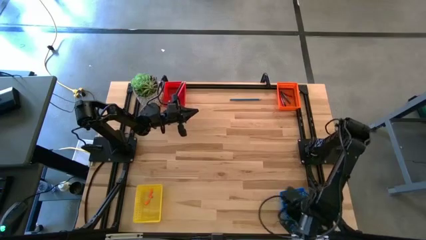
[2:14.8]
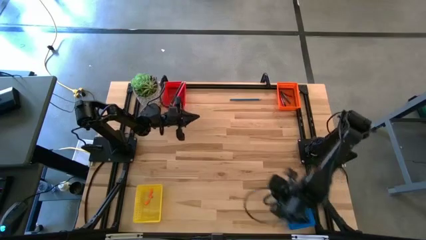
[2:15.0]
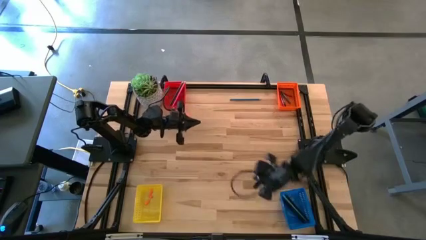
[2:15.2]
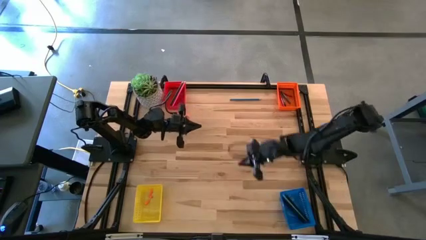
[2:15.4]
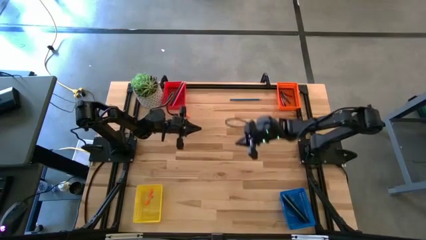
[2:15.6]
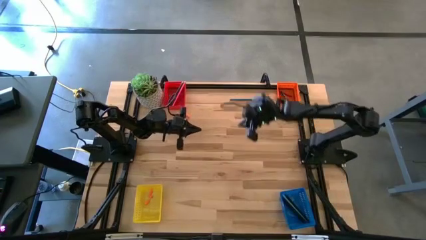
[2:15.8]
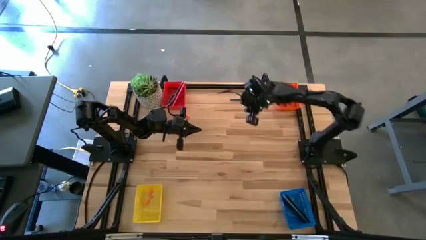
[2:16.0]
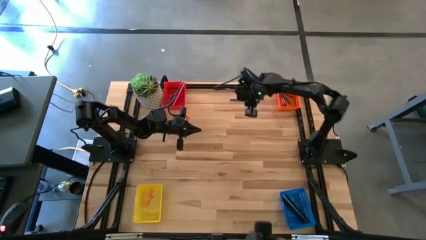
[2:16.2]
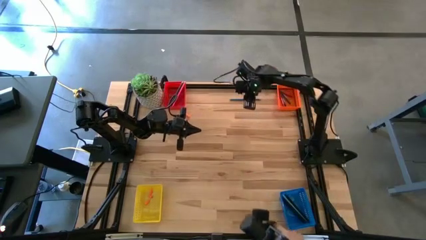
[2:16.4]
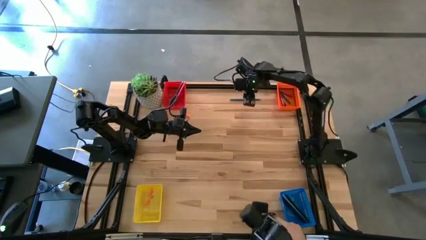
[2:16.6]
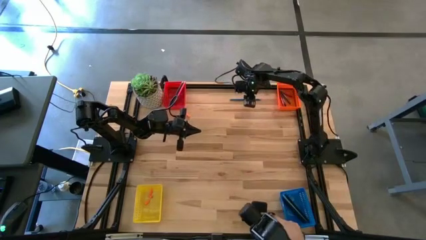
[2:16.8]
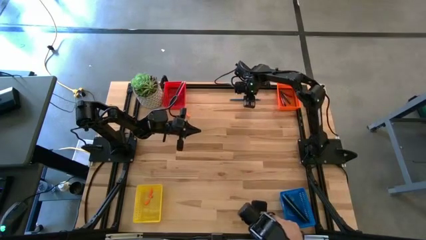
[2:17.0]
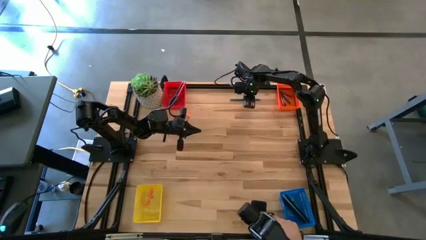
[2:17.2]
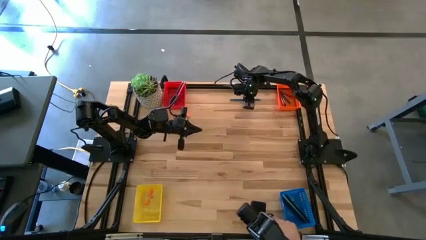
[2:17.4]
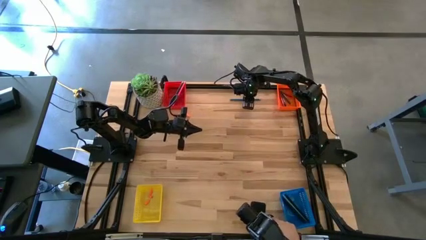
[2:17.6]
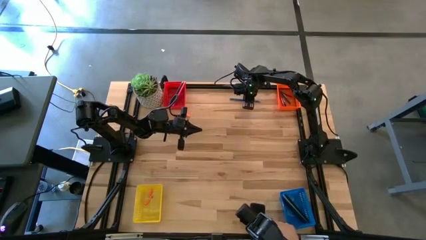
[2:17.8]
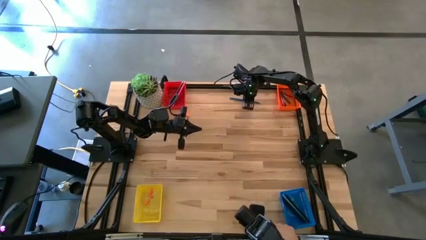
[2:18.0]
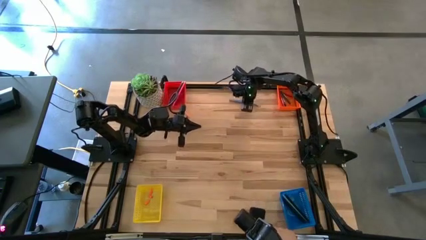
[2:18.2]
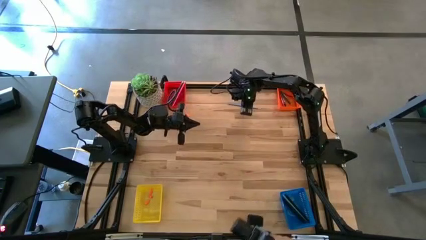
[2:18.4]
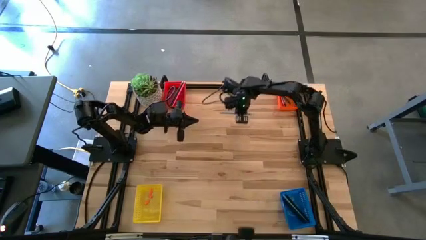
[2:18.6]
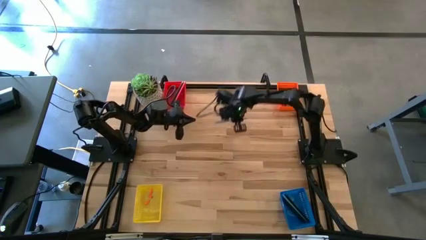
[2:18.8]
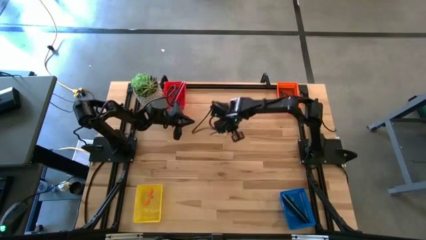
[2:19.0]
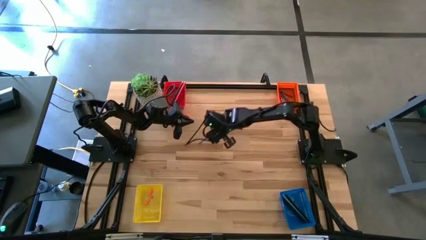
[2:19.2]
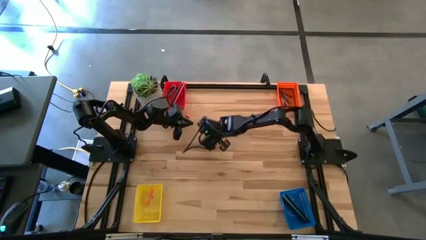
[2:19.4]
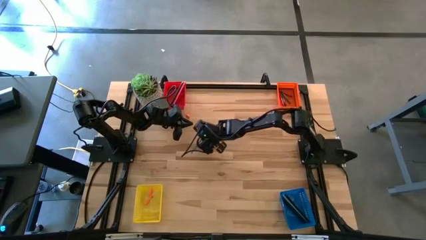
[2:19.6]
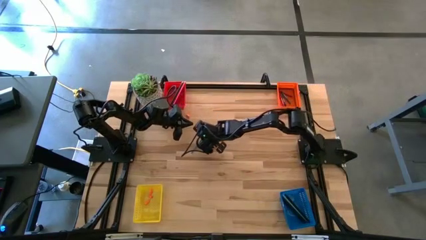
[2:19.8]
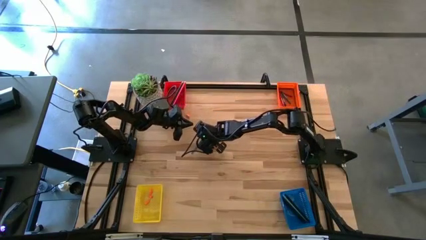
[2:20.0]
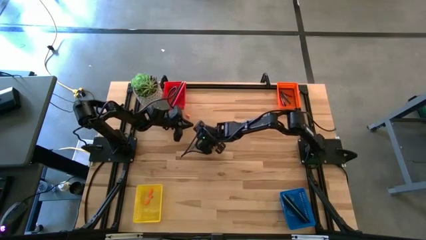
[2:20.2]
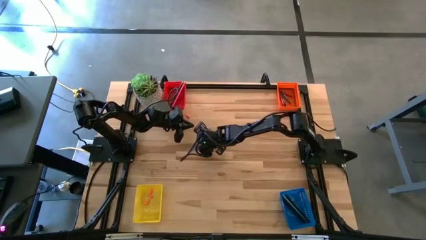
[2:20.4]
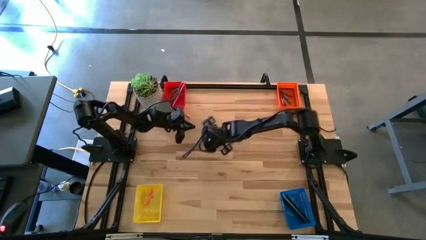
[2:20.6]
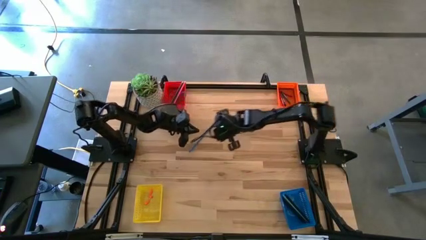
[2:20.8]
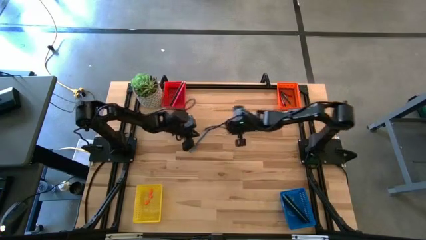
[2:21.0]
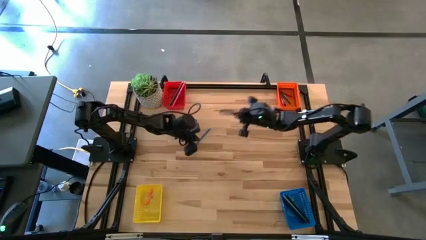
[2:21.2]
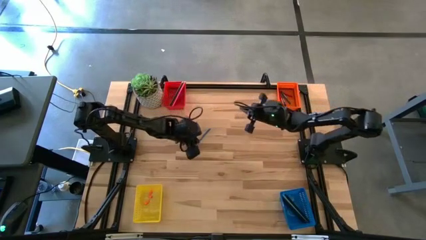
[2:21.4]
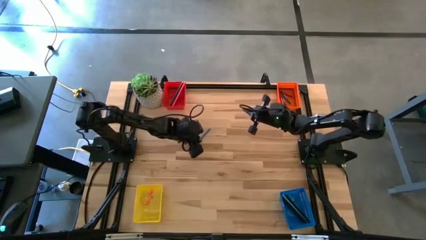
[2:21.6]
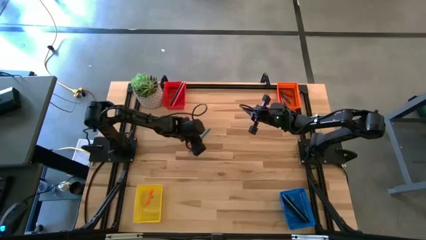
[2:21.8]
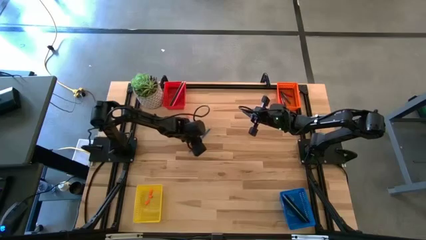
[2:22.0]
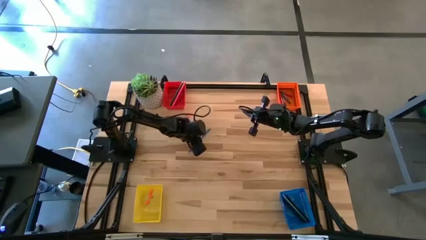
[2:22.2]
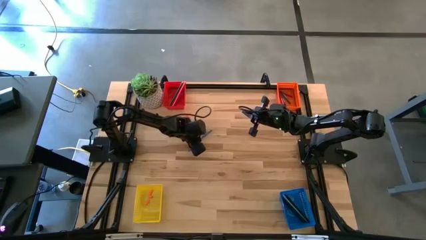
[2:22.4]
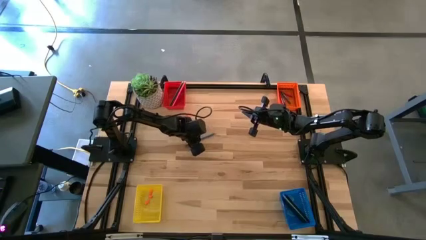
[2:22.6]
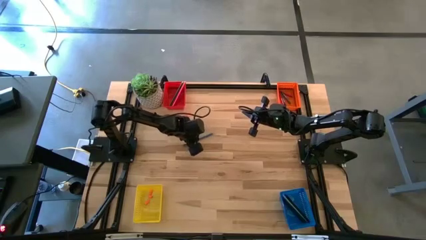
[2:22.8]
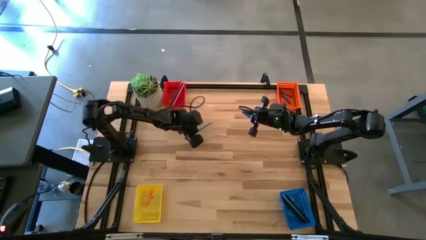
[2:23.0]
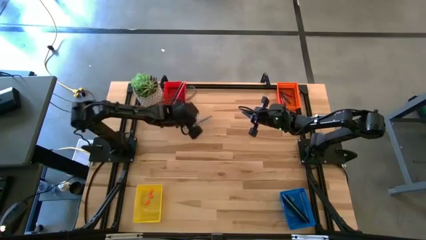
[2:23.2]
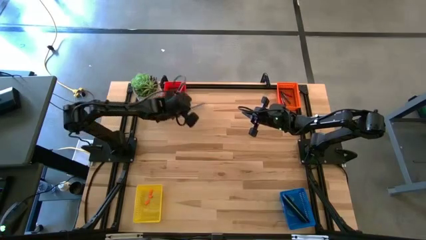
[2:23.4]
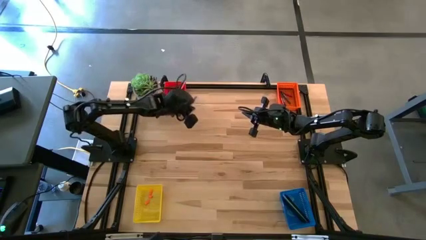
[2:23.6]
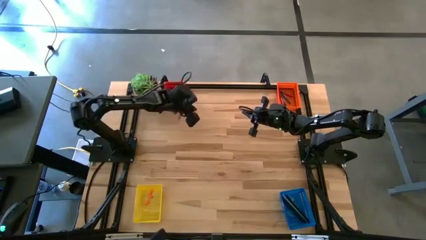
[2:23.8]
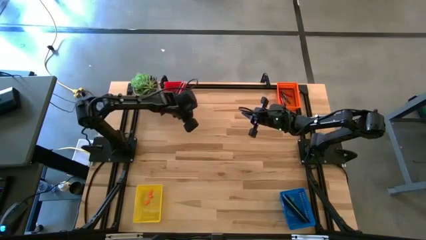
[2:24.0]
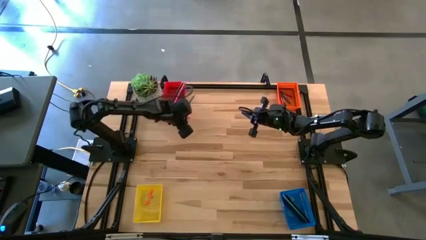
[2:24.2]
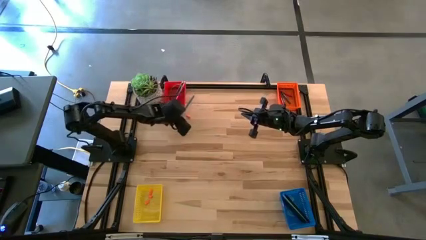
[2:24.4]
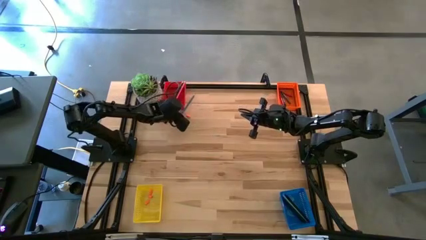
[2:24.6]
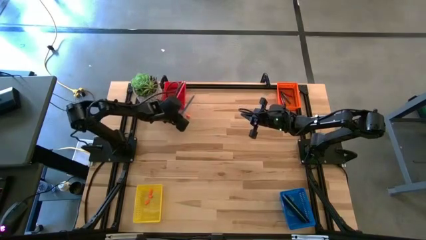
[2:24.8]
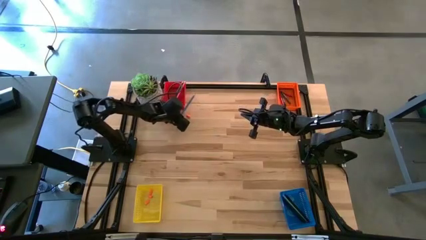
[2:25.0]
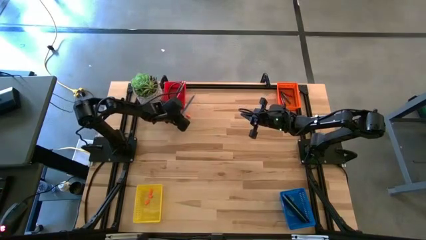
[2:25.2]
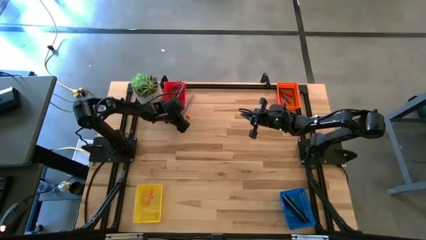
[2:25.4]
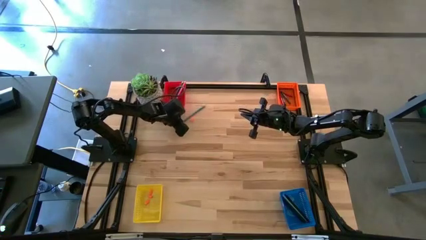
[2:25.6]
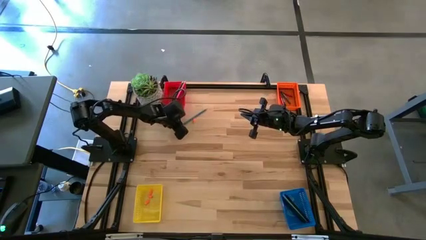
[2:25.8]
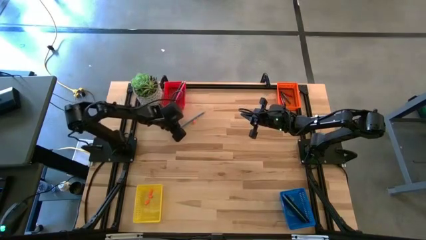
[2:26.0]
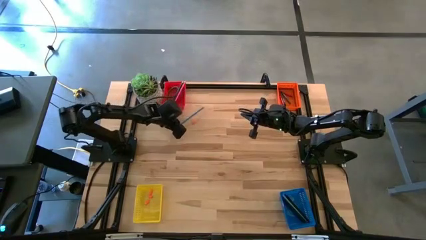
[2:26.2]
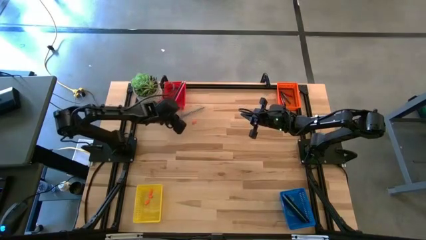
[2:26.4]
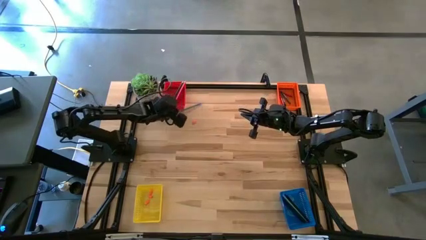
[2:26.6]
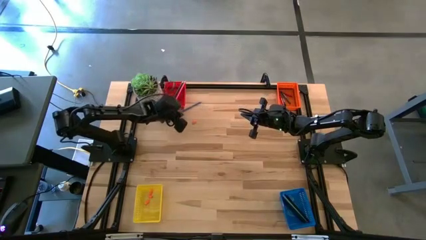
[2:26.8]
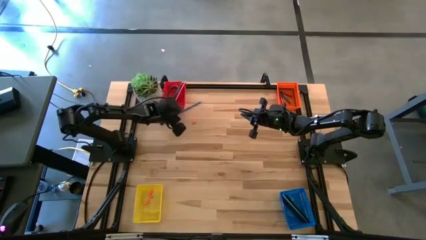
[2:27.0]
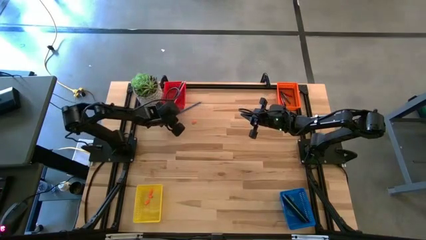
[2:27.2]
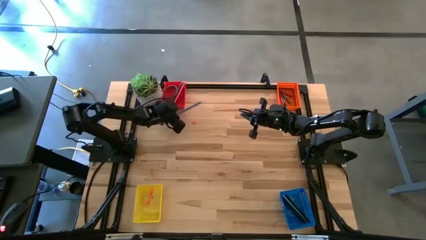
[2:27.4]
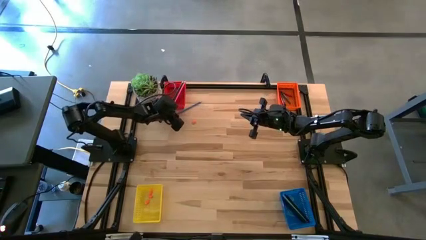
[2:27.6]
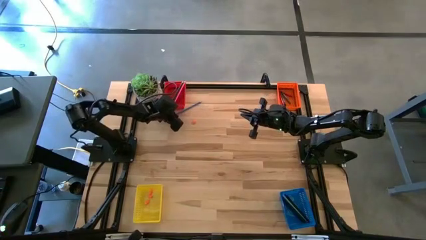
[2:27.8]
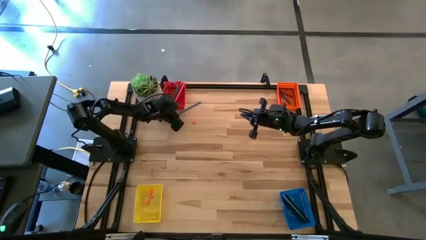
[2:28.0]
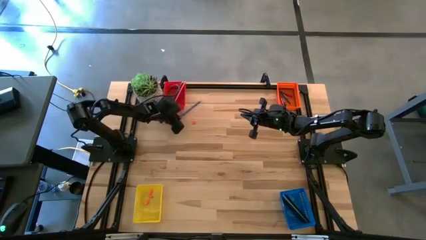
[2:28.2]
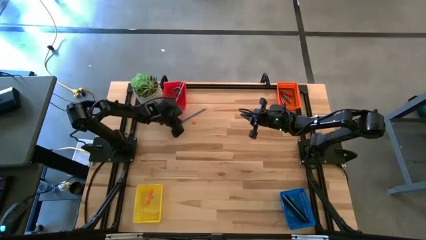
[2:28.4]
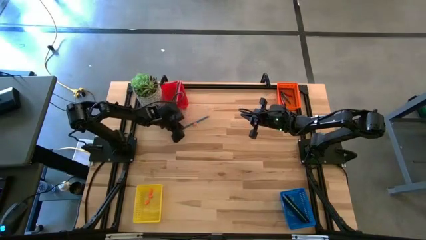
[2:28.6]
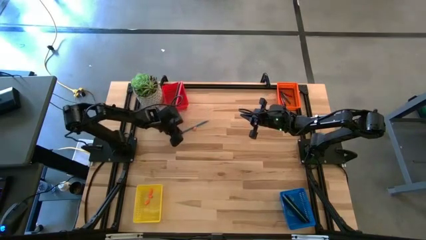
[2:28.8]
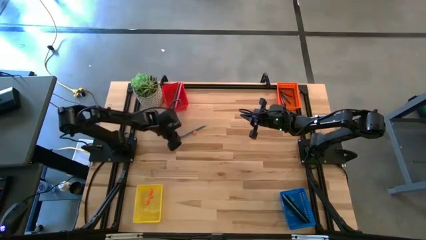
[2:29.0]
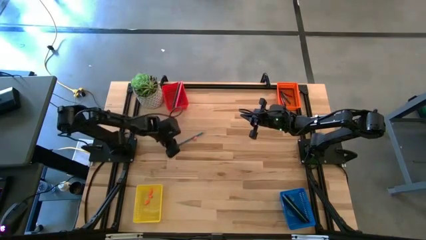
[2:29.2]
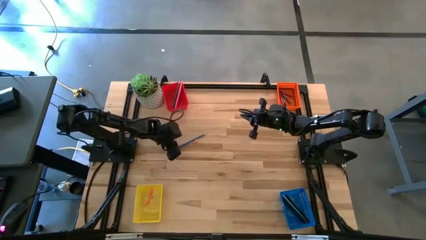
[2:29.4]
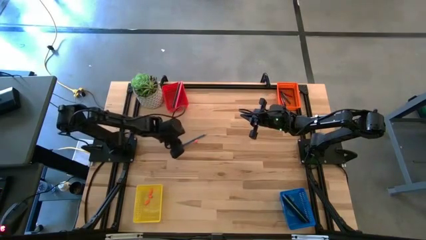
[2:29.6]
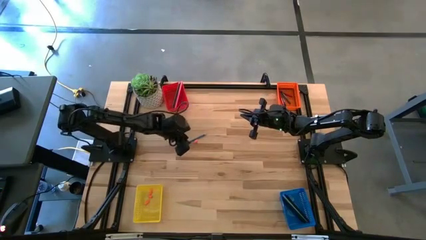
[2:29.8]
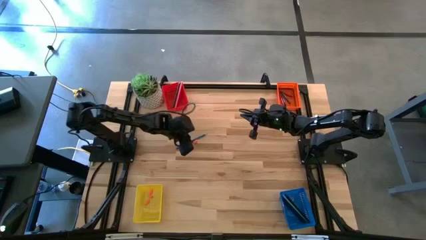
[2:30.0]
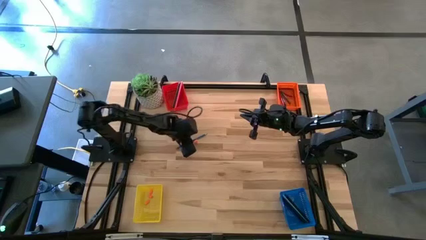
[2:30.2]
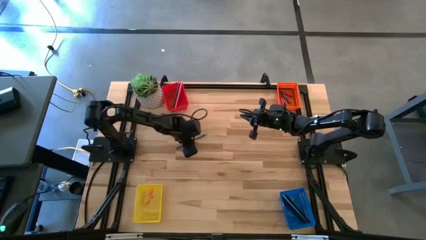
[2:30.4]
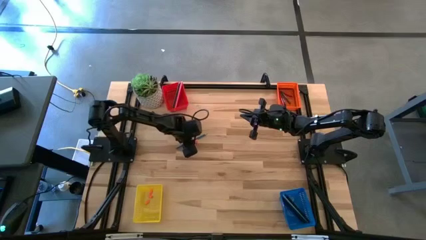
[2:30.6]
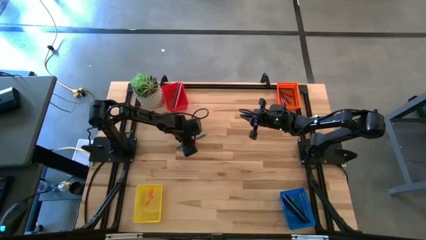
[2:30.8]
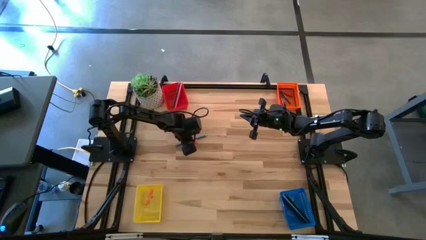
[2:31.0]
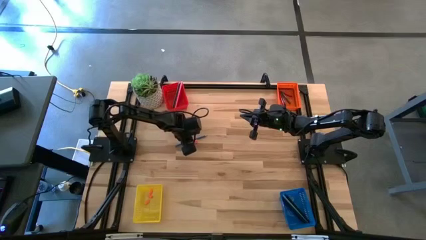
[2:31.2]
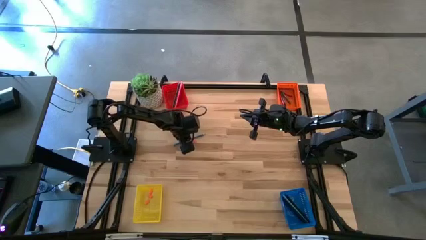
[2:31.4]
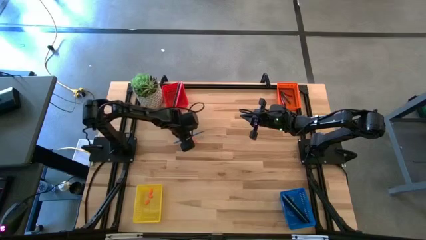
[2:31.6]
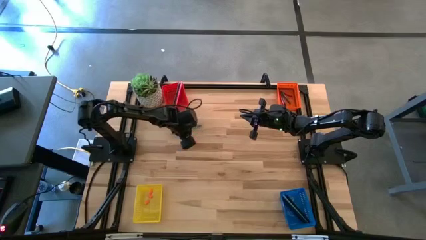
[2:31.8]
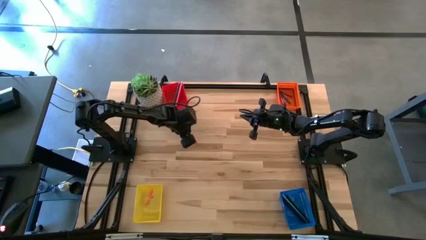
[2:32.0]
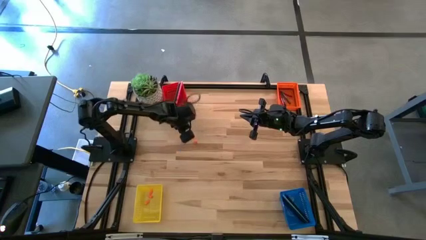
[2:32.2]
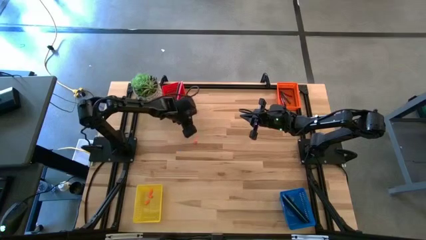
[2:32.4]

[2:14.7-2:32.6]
Task: Sort crayons/erasers/pens/pencils in bins
Put the blue pencil into the red bin
